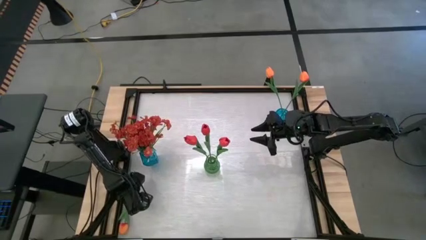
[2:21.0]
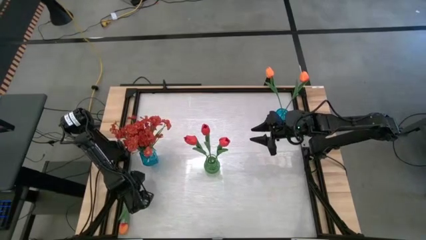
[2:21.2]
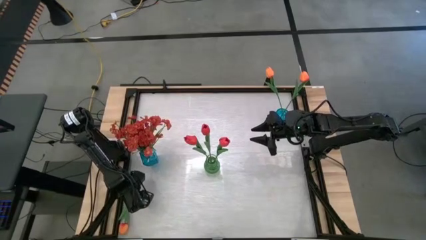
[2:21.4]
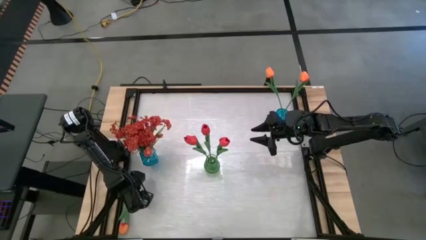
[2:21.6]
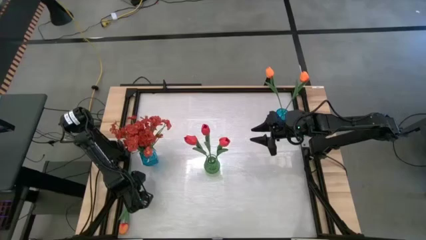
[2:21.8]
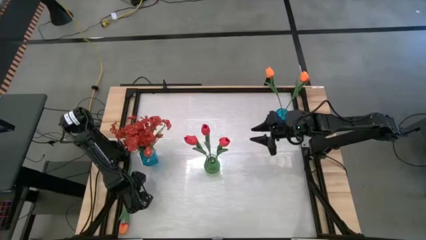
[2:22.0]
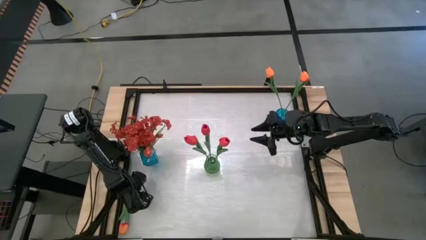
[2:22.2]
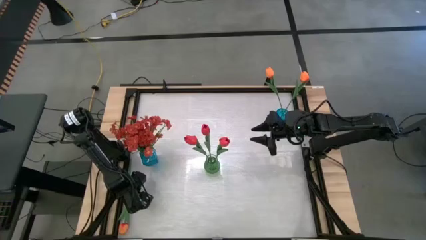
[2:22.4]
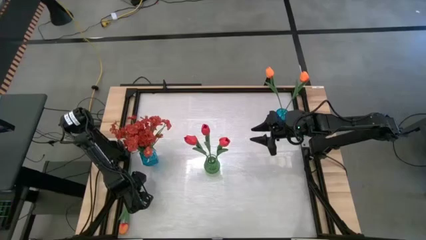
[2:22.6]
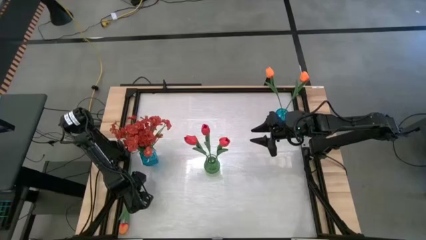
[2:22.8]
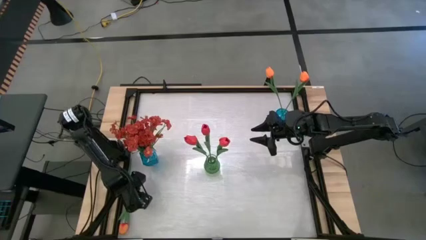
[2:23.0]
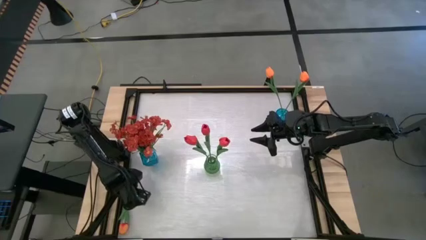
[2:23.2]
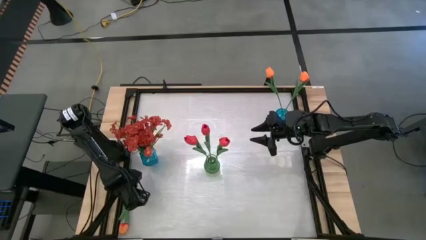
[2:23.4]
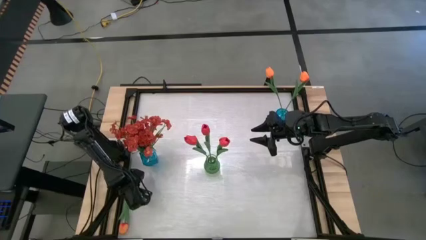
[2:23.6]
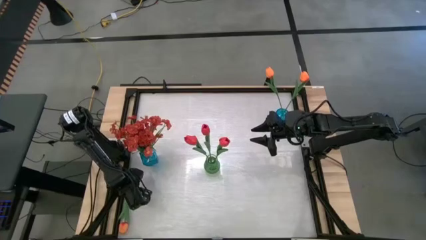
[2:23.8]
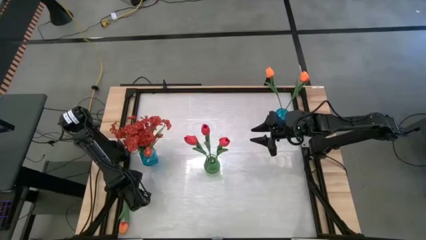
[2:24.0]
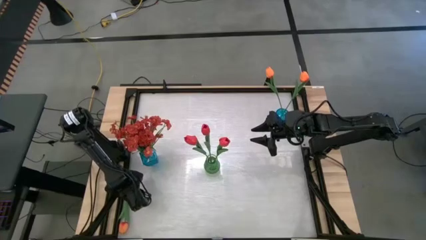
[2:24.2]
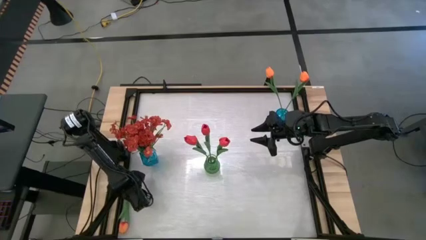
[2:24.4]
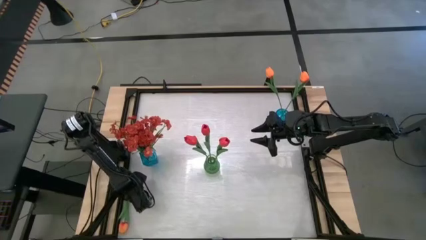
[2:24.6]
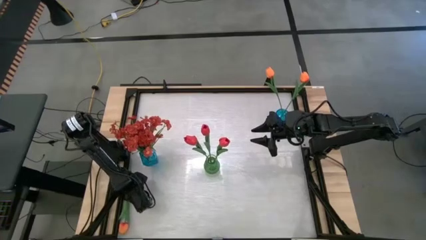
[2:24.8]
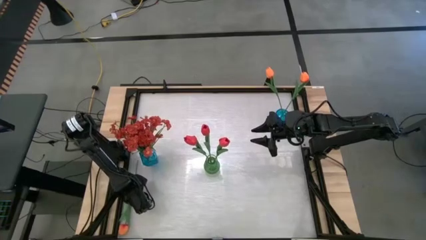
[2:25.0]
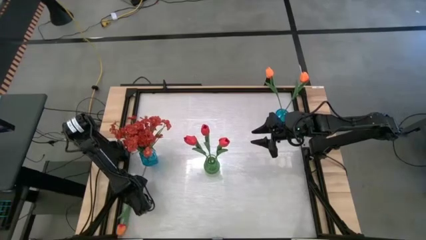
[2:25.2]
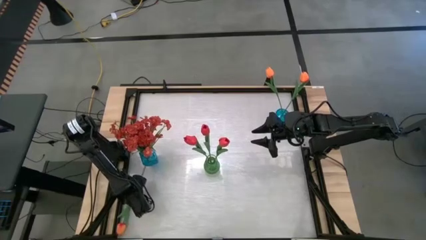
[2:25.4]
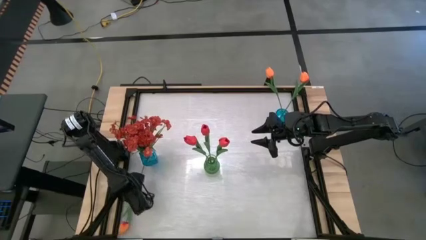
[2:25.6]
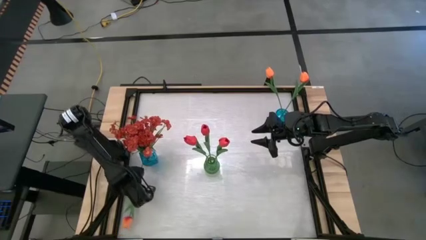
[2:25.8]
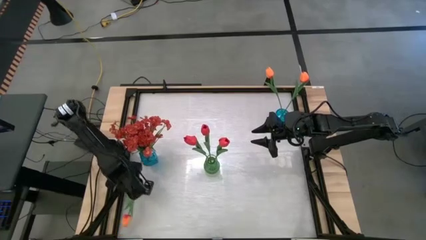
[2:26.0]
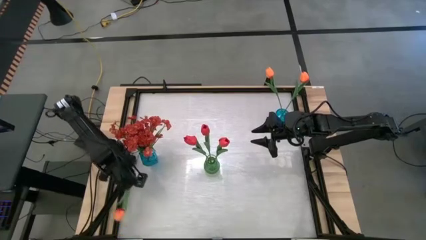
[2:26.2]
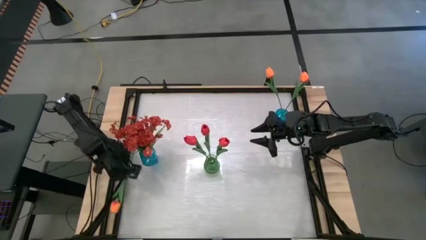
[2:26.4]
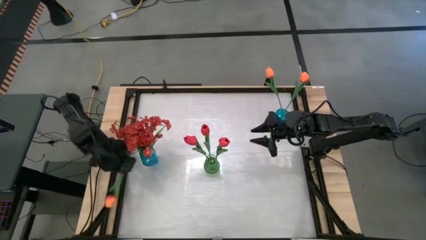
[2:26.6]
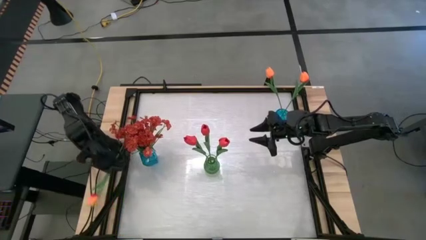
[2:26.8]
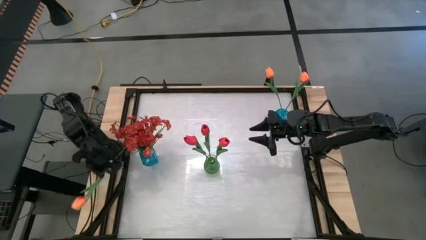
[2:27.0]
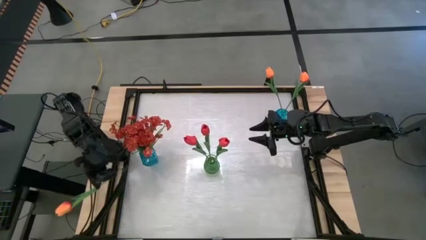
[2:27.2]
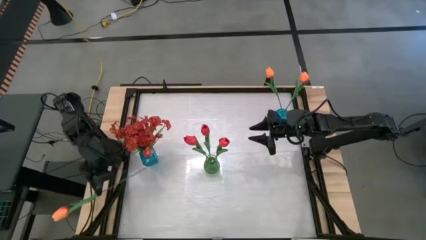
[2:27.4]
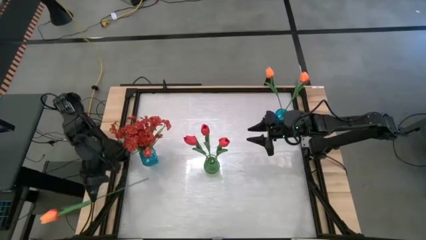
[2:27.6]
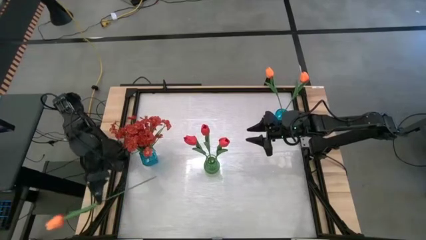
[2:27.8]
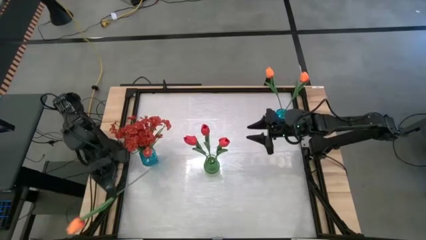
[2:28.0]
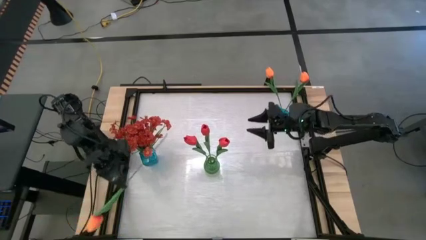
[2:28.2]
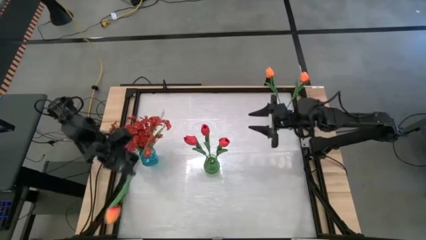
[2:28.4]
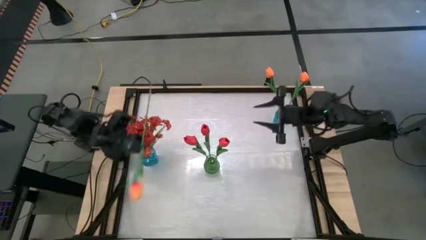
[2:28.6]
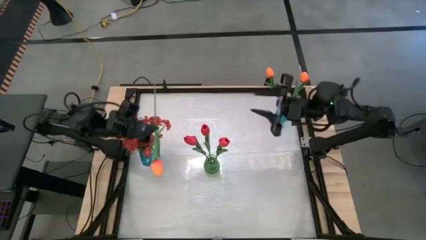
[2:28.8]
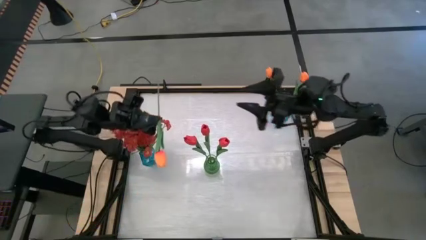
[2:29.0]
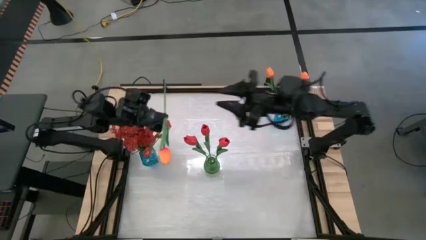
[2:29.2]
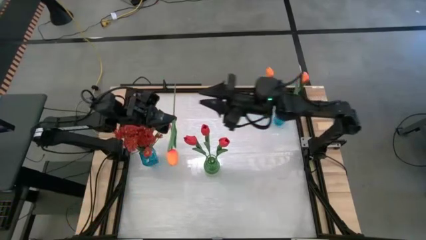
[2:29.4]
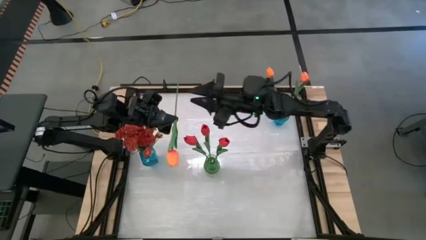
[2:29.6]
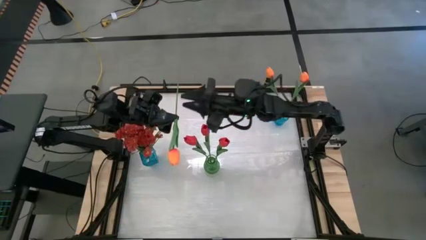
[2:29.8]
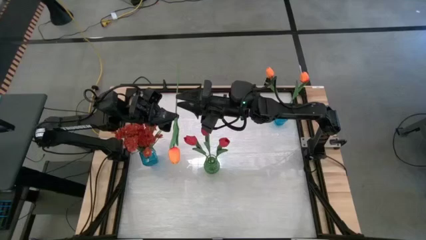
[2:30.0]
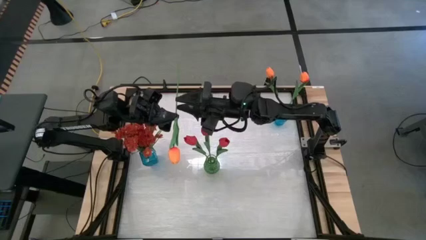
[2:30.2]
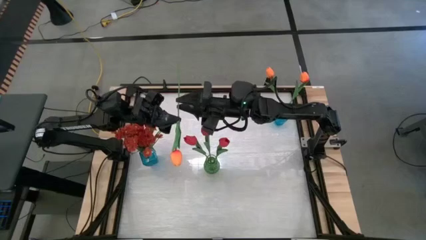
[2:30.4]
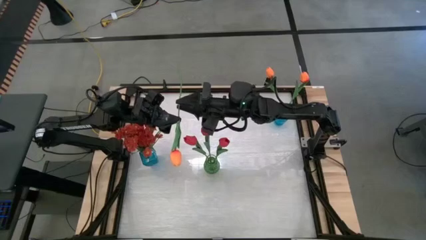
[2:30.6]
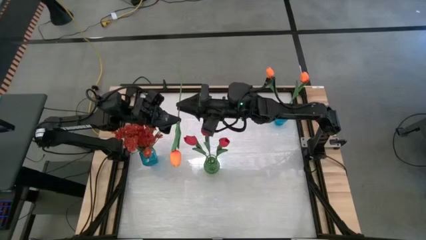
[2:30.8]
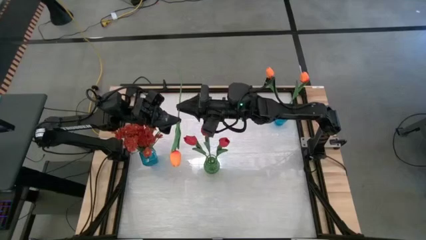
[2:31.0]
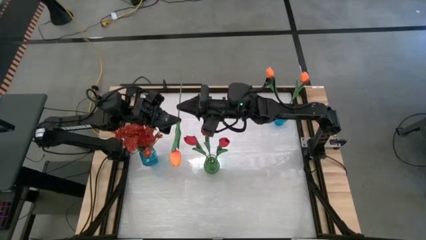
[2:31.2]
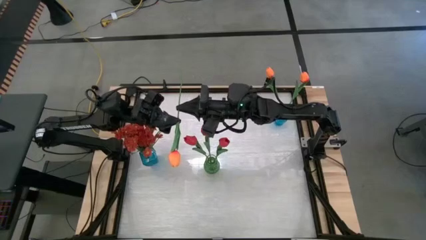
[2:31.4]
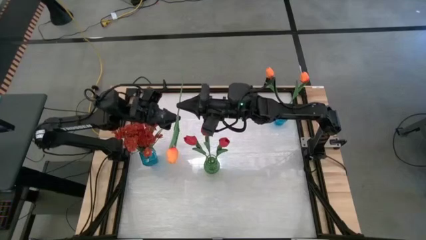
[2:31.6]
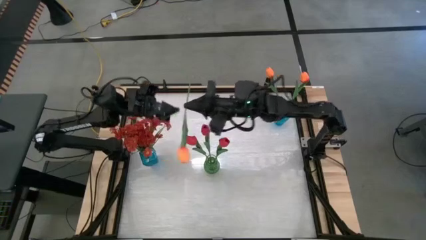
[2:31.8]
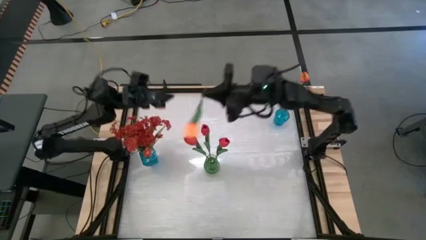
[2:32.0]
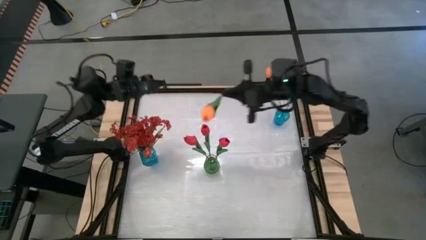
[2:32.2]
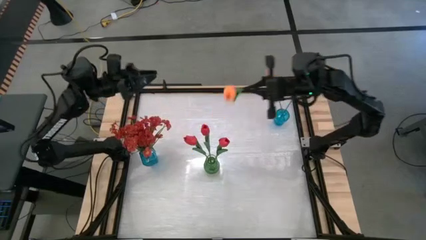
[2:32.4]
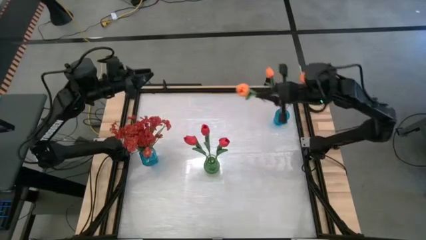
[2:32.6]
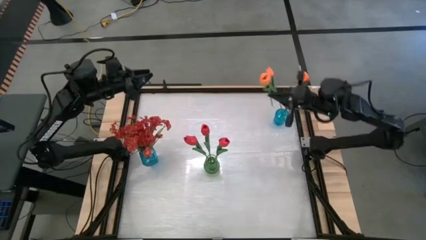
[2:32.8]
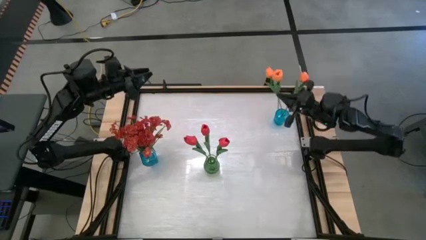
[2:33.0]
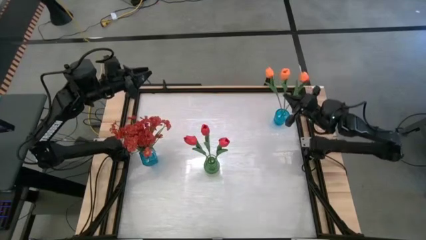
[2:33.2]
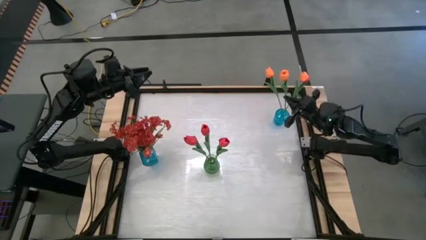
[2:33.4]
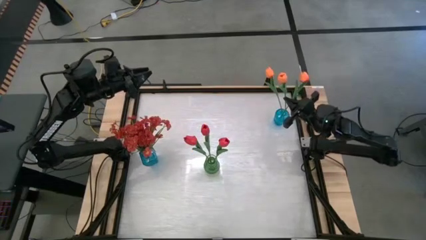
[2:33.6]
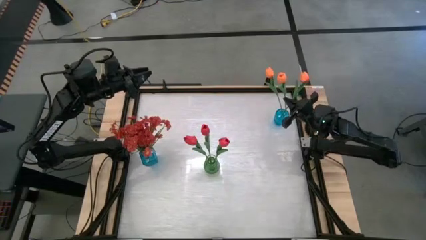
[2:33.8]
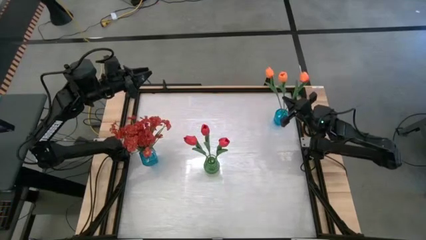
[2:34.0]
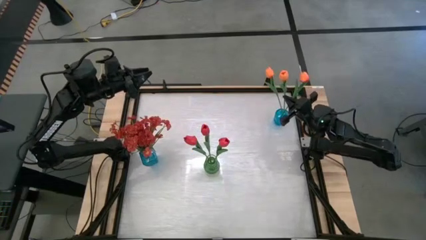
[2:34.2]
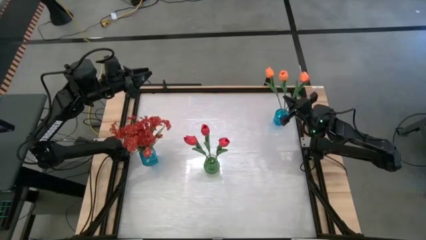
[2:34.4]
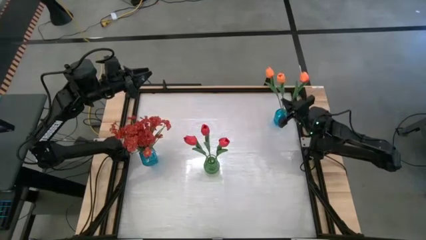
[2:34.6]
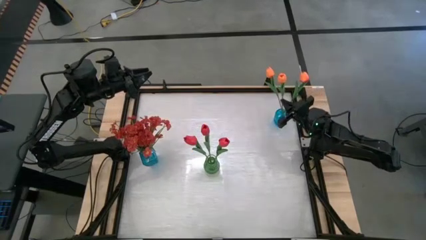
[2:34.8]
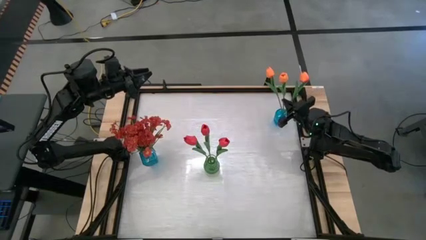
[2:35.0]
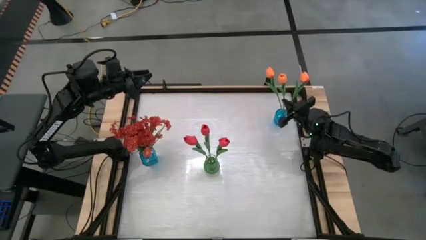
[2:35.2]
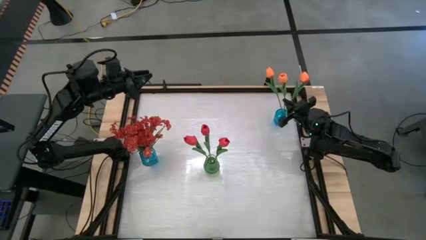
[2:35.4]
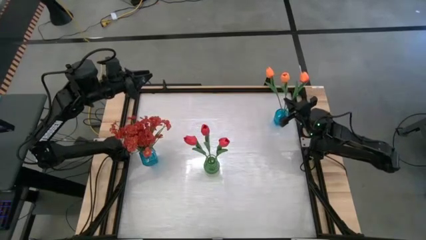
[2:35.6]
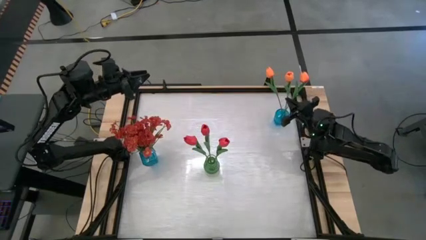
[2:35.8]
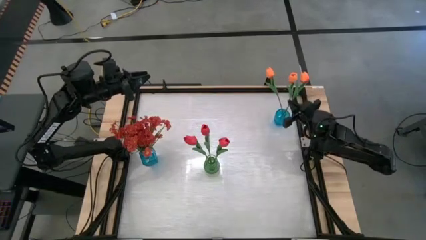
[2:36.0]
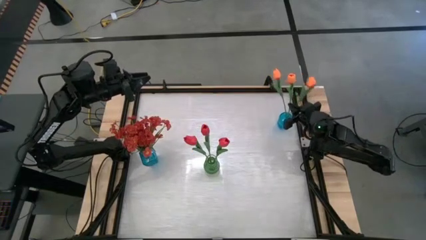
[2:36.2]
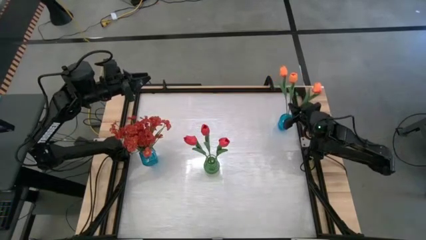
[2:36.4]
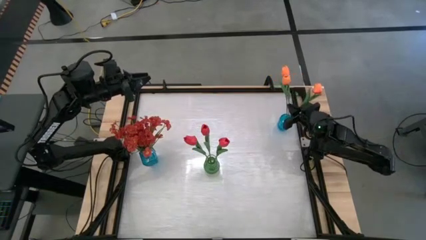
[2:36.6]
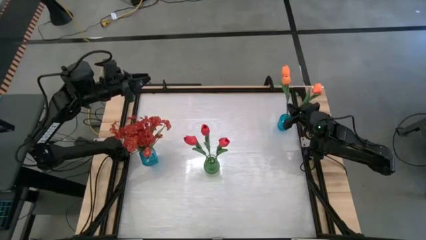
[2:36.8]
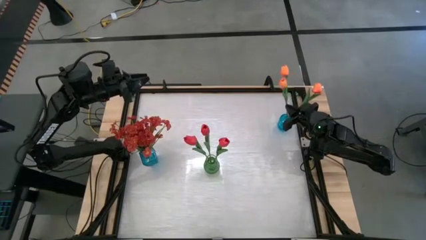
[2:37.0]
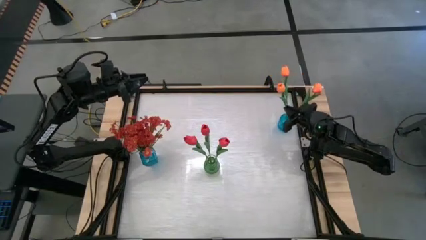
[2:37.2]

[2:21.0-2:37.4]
Task: Sort flowers into vase by color
Put the orange flower into the right blue vase
